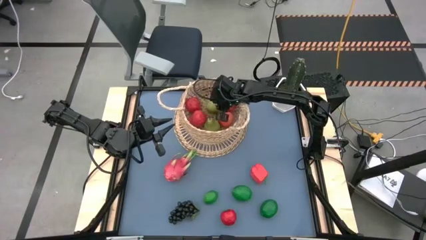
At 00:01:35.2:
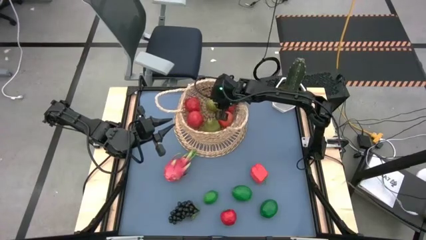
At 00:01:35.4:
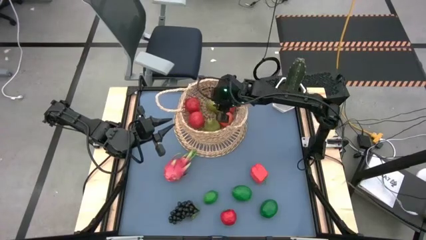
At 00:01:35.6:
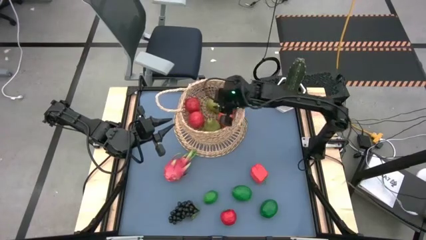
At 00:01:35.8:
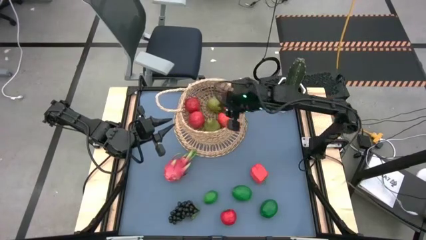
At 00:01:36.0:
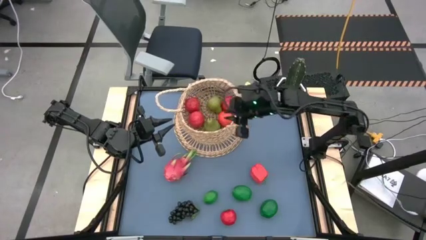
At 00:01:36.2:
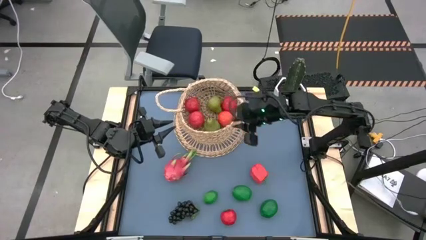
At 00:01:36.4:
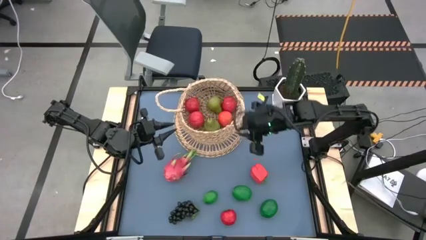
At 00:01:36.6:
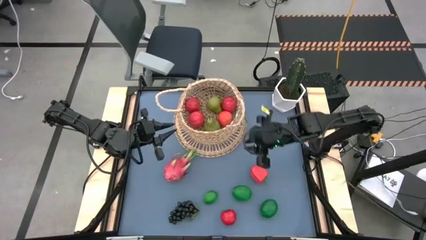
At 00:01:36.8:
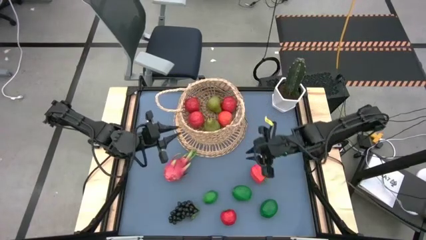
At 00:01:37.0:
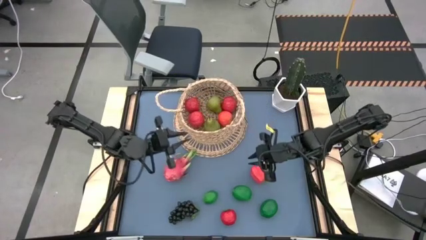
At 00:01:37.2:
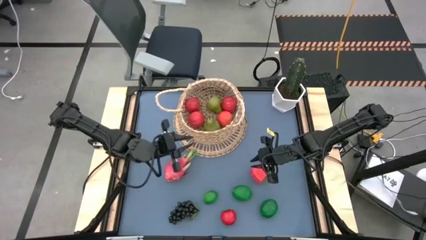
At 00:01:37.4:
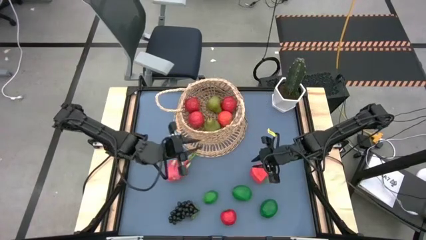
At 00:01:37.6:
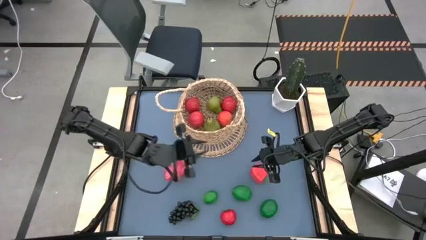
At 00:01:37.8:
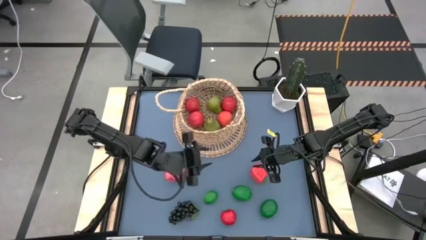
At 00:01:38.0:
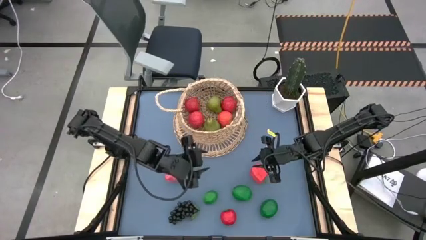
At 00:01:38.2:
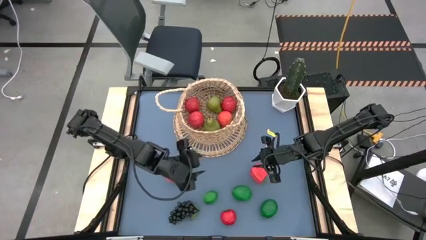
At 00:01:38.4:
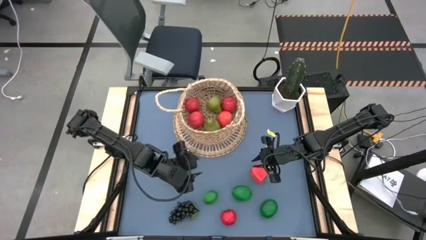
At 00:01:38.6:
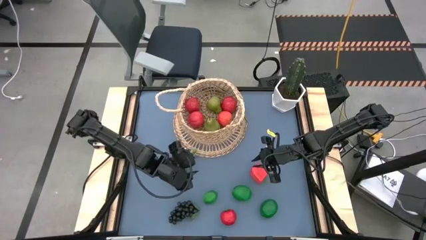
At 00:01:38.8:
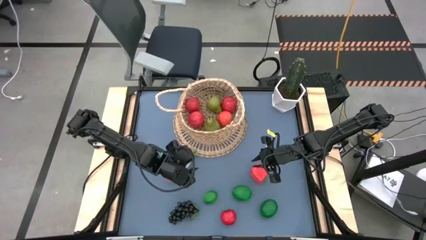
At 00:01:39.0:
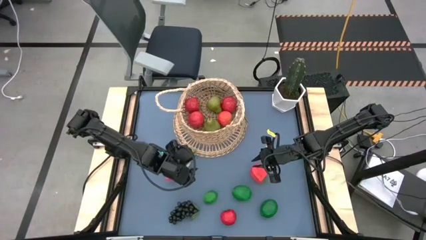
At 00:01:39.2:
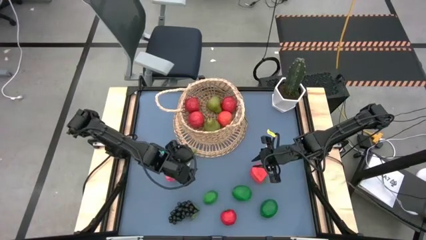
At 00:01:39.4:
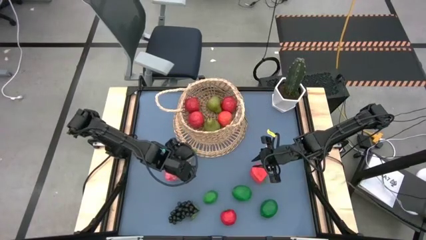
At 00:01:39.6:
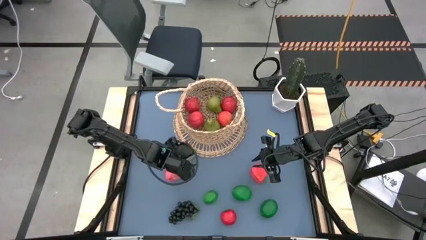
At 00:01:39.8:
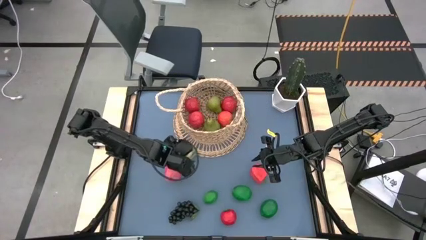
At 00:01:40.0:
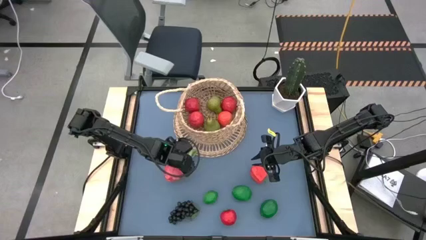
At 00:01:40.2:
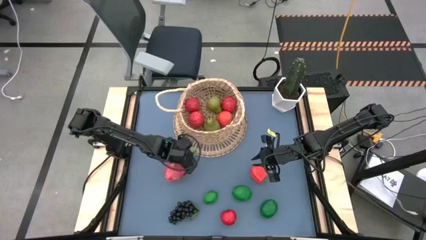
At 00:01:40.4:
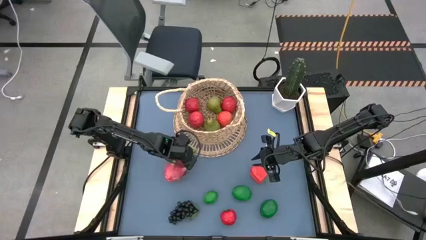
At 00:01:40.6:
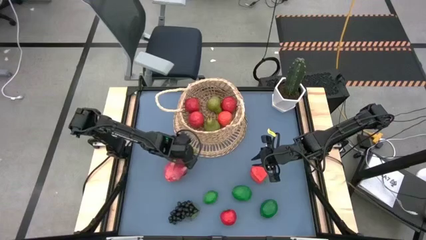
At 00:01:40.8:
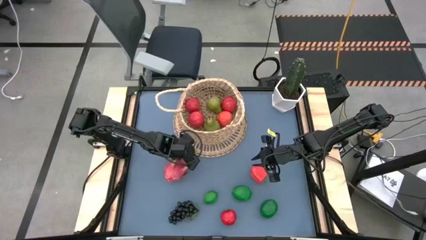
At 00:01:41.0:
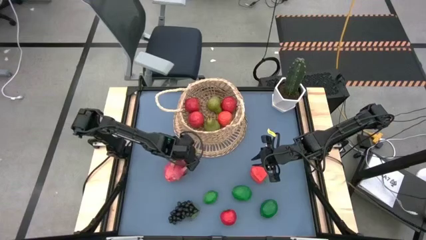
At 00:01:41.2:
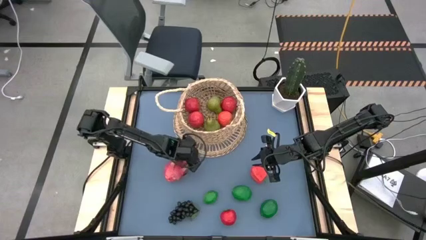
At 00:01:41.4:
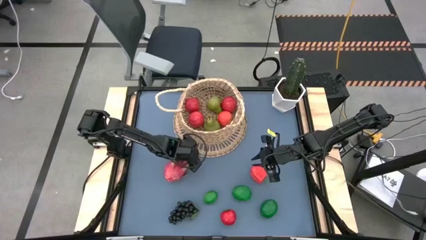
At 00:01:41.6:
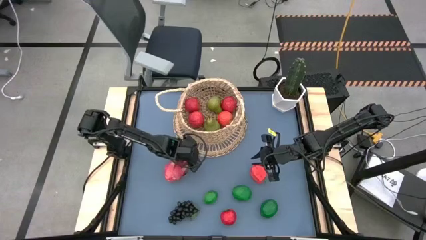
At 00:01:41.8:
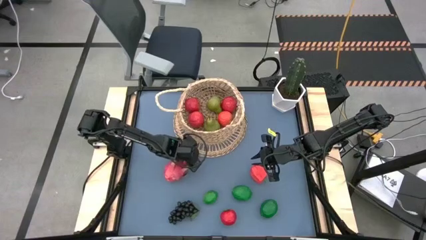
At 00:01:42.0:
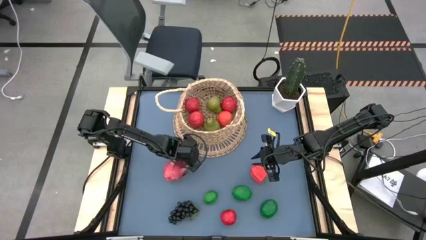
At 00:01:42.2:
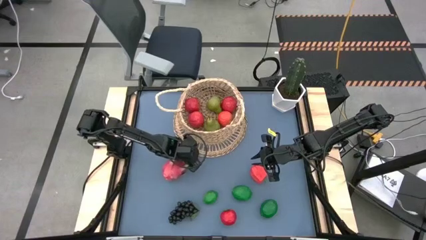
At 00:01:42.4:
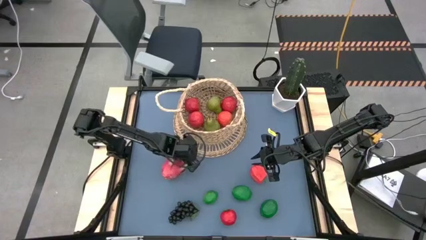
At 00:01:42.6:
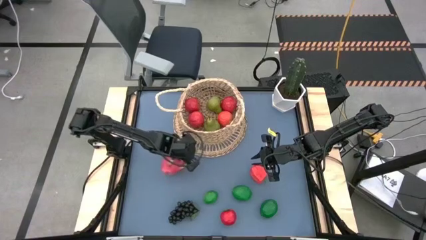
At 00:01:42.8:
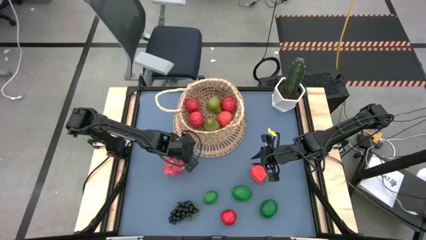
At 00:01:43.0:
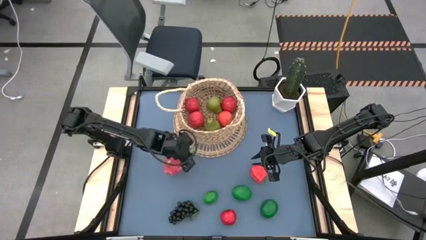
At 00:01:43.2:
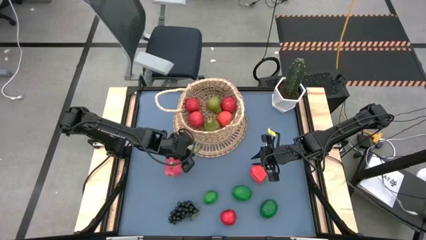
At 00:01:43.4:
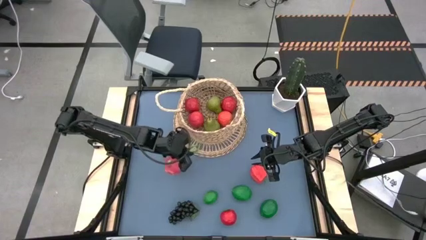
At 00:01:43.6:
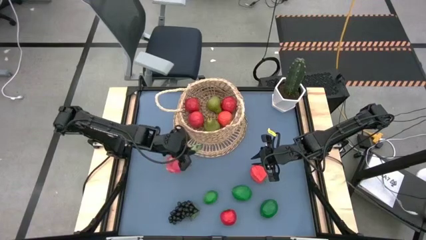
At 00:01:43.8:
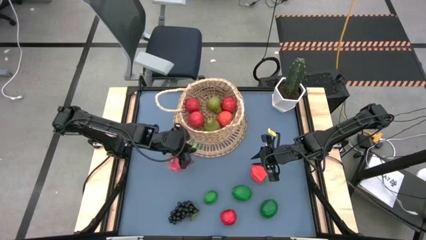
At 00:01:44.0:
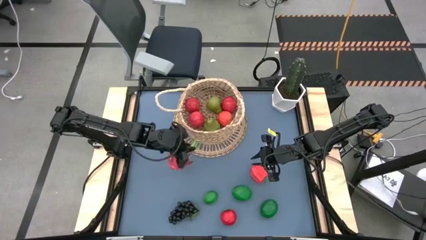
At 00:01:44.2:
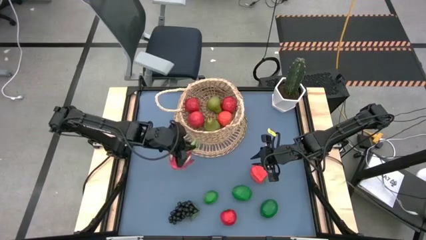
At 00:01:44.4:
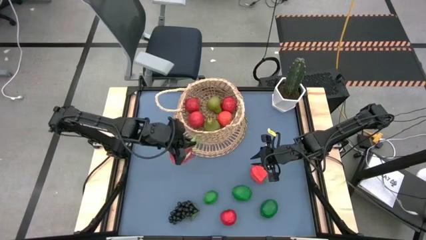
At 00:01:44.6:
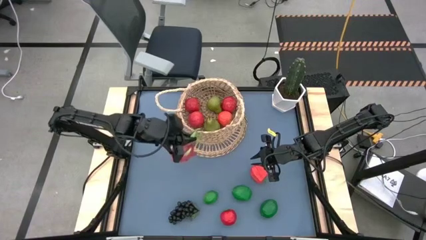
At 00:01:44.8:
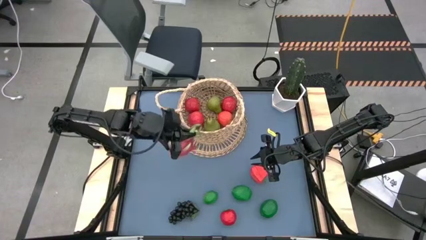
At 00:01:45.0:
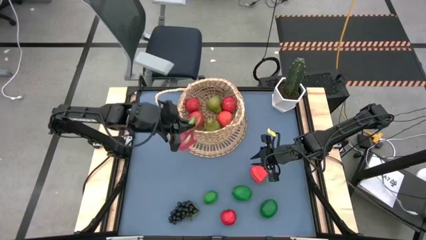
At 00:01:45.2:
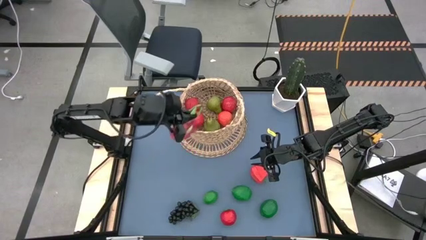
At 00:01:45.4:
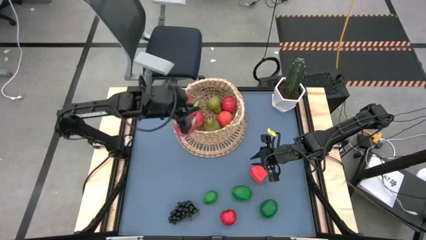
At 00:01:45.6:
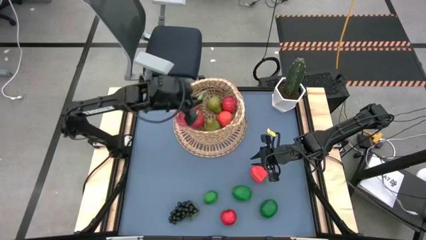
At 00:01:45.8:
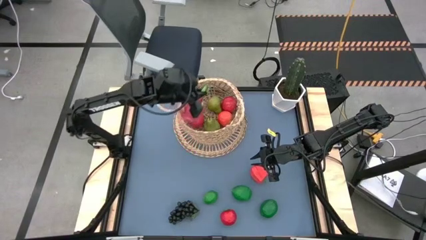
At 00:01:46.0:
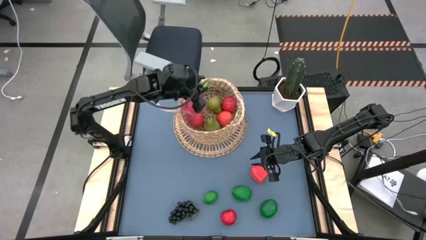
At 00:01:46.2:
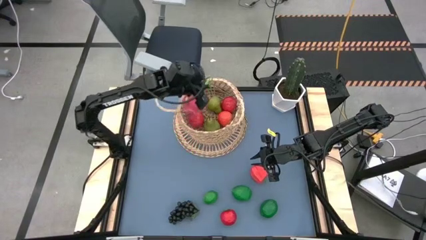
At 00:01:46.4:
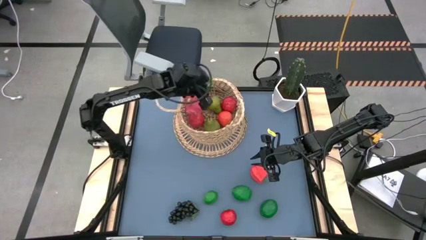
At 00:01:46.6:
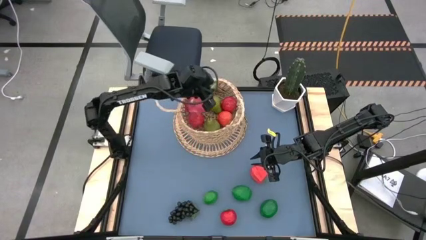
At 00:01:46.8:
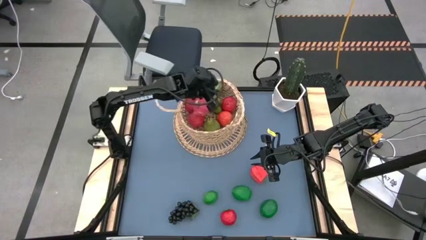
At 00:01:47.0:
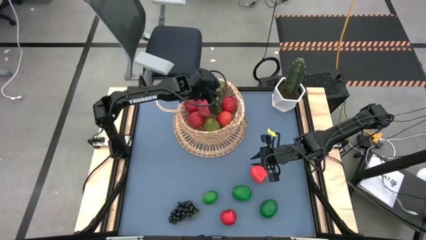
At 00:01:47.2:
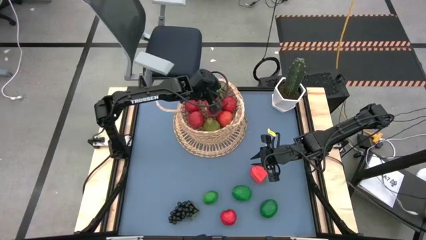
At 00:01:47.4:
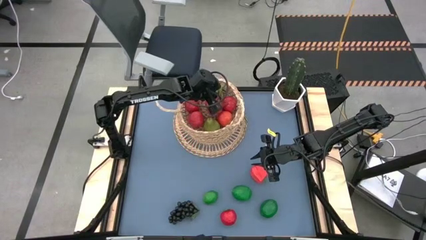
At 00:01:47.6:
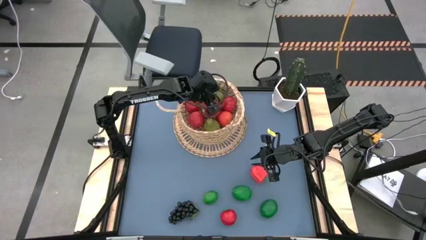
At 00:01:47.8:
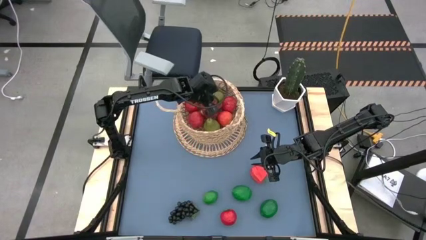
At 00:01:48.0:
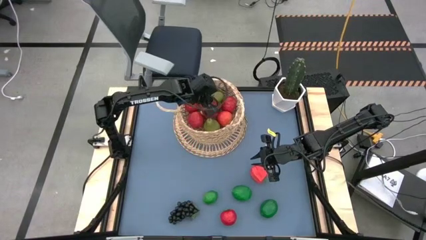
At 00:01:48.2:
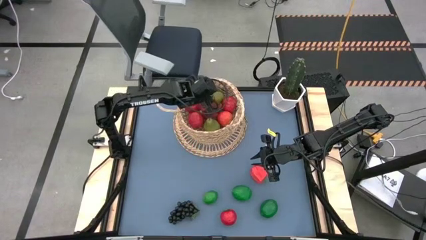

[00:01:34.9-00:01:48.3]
Task: Build produce basket
Put the dragon fruit into the basket
